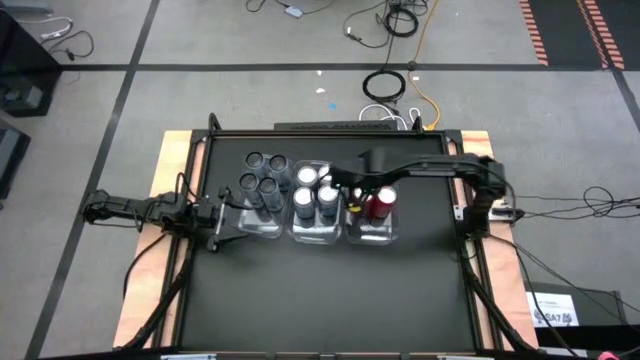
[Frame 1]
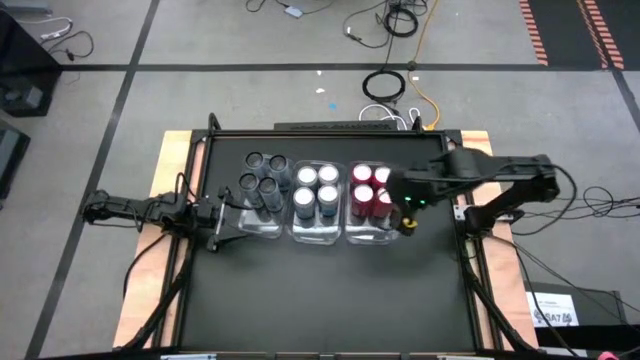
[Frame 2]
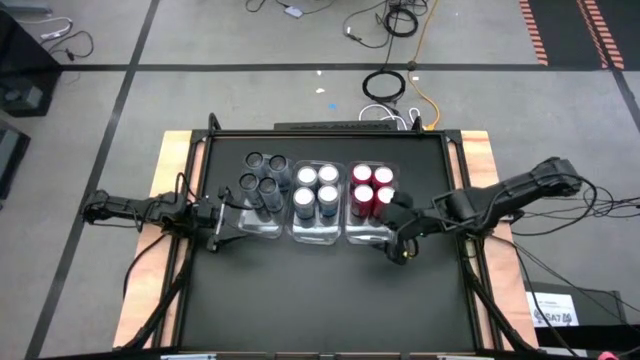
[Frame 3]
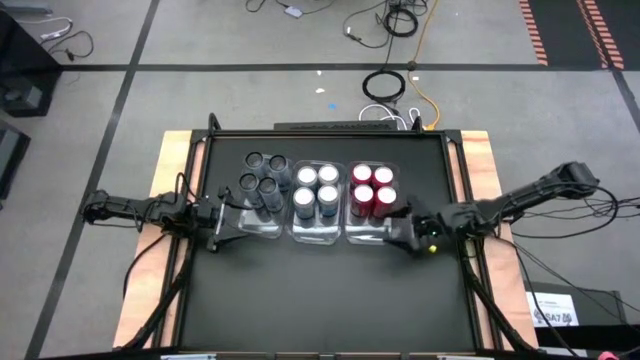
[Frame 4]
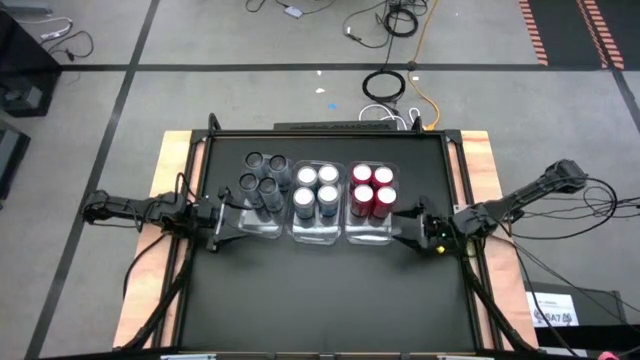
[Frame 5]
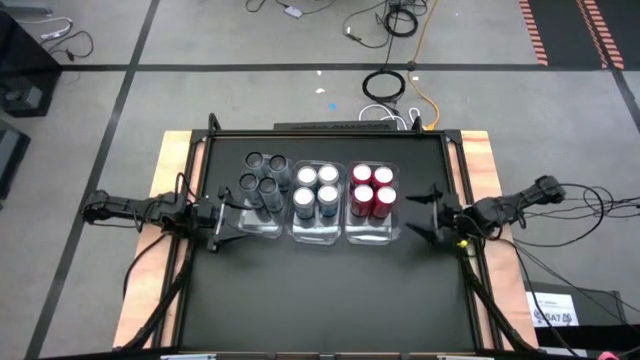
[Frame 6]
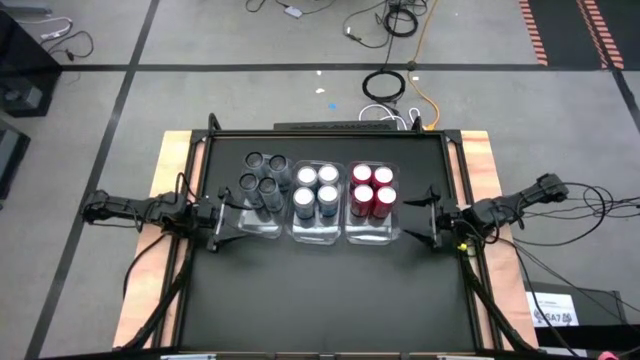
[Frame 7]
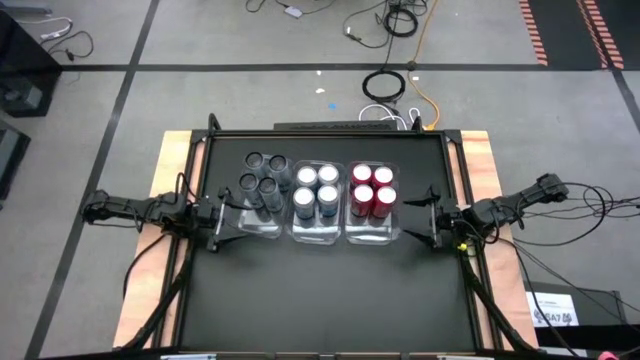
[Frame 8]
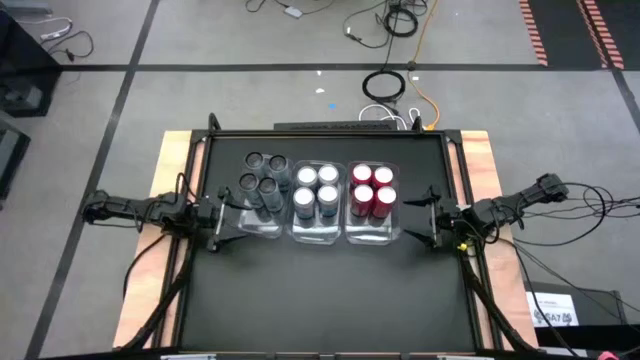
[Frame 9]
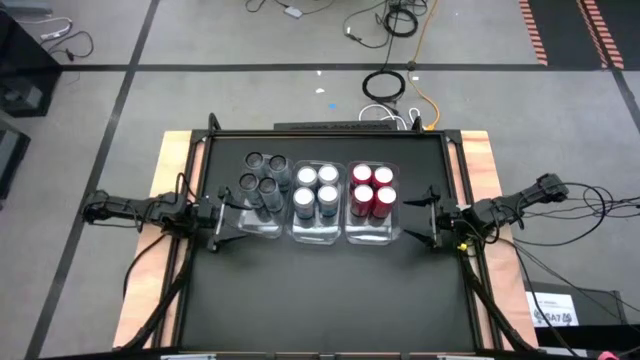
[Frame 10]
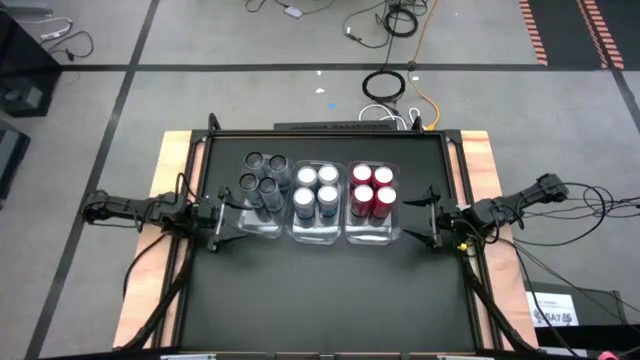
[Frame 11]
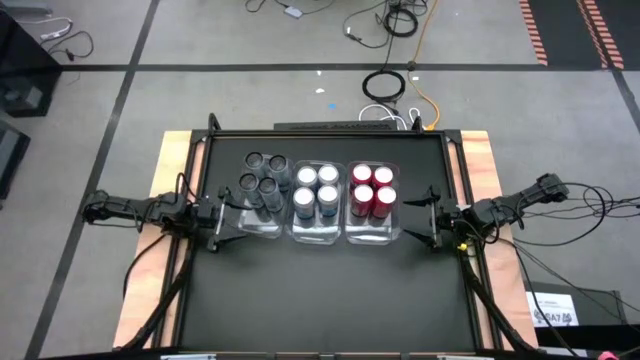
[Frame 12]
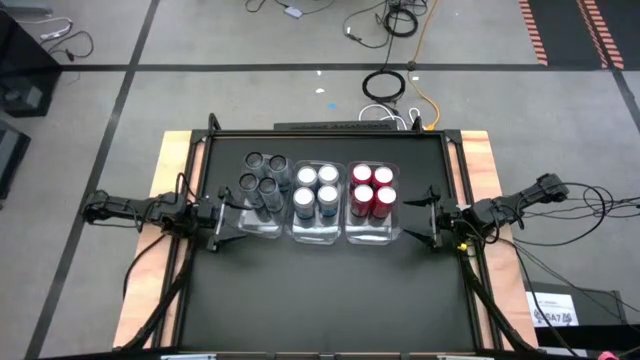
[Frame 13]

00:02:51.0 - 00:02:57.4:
Task: Sort soda cans
Return to Home Position

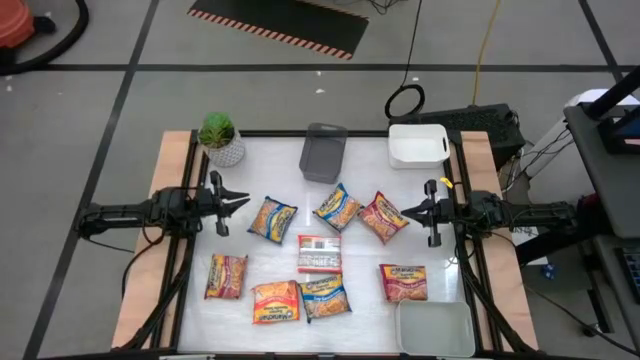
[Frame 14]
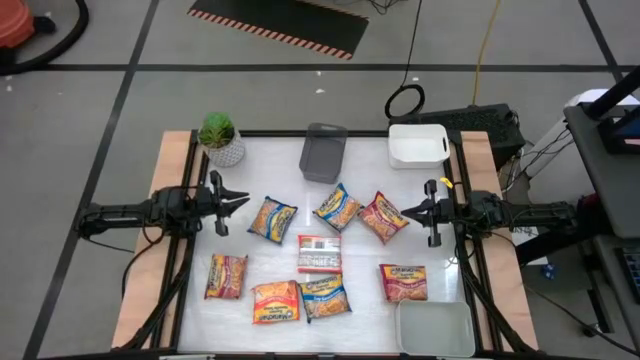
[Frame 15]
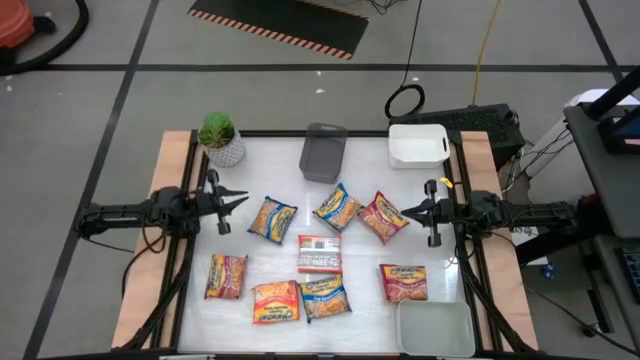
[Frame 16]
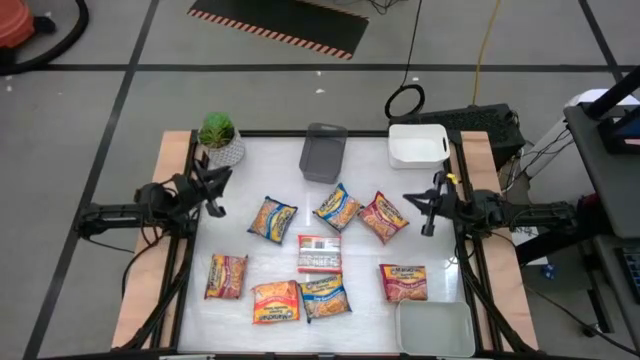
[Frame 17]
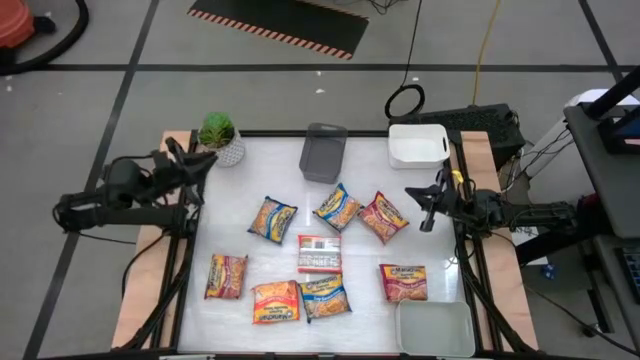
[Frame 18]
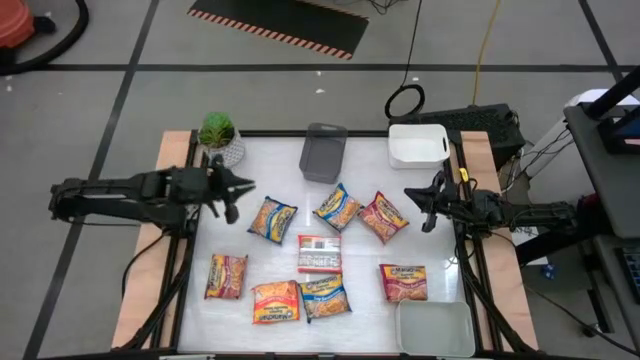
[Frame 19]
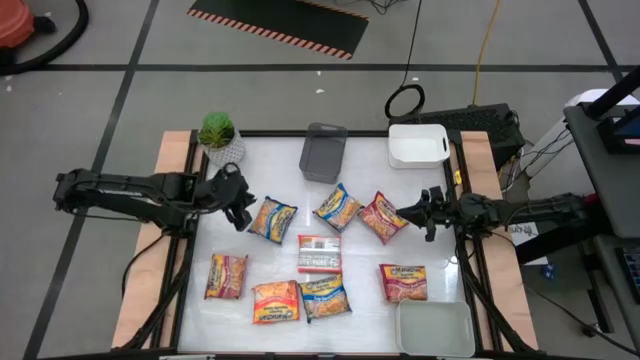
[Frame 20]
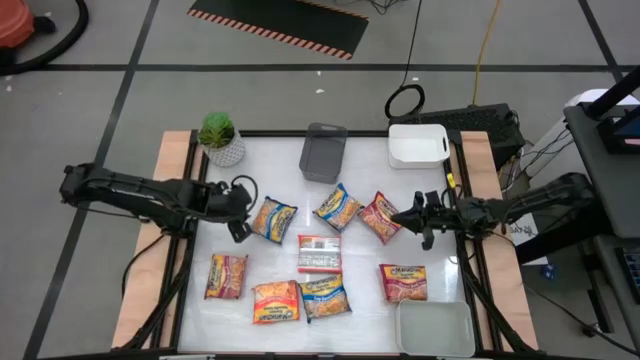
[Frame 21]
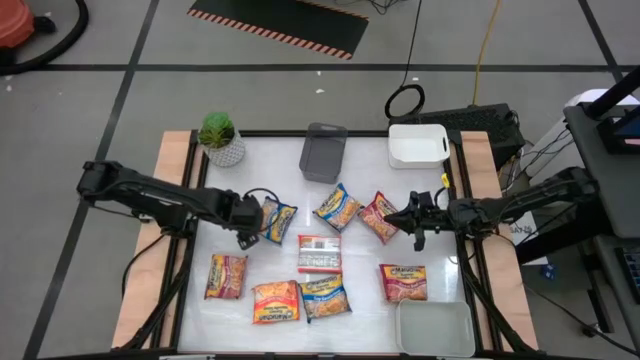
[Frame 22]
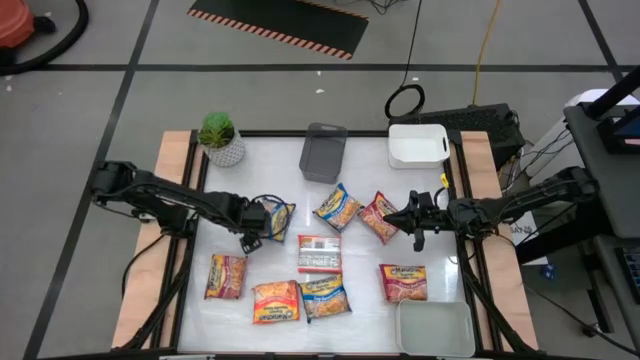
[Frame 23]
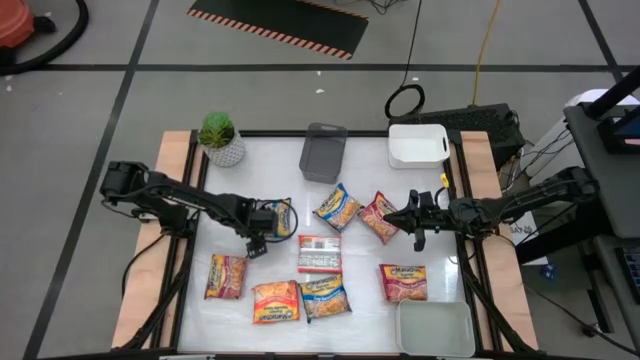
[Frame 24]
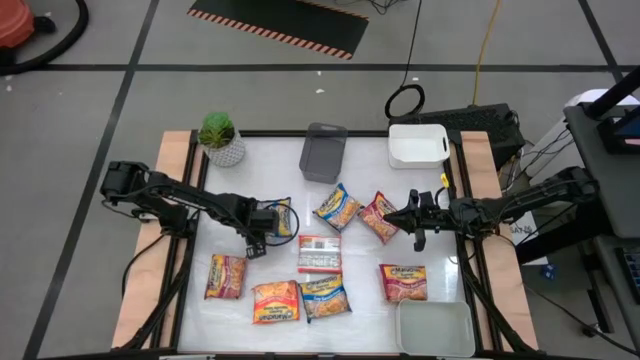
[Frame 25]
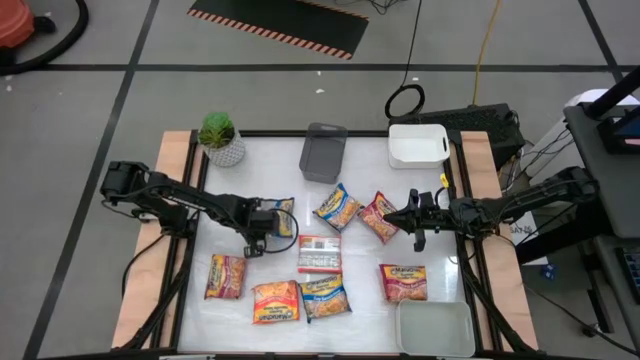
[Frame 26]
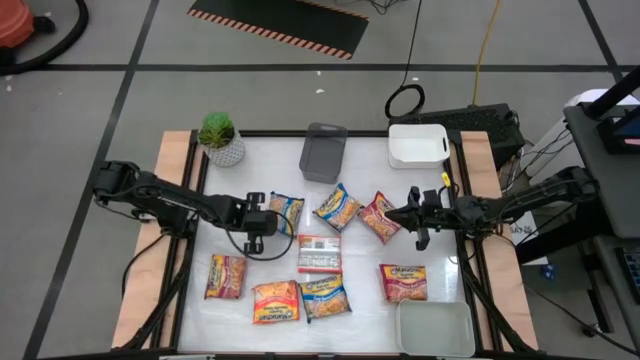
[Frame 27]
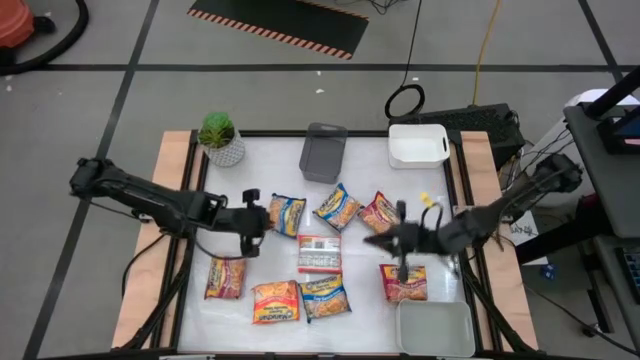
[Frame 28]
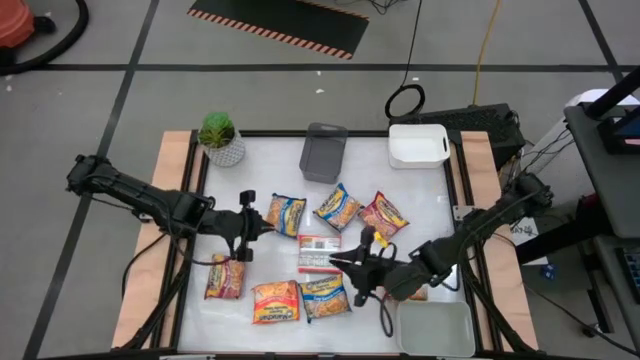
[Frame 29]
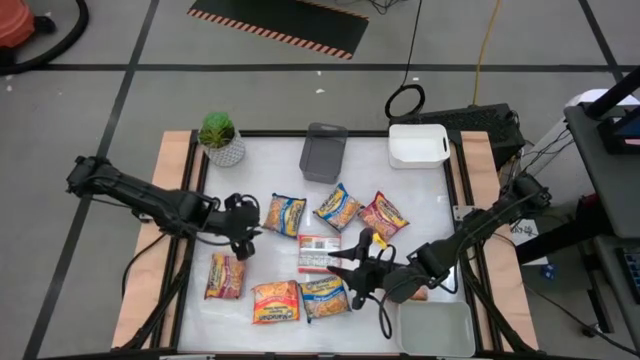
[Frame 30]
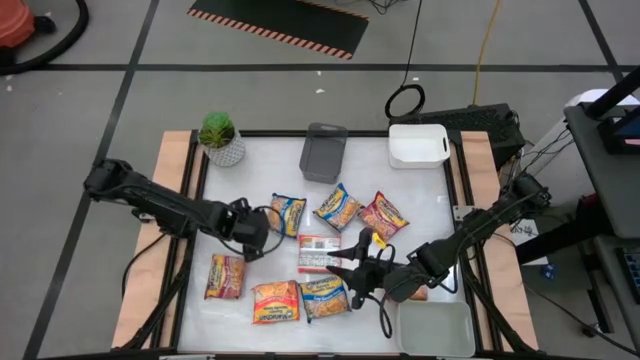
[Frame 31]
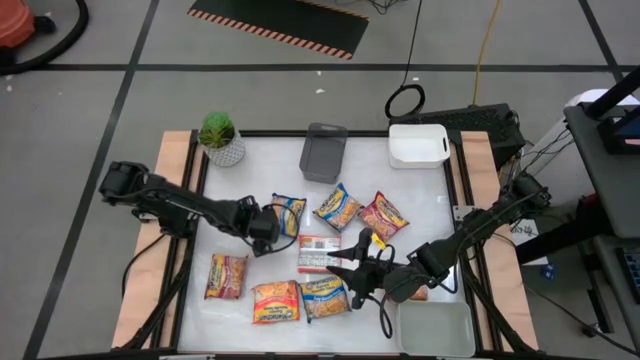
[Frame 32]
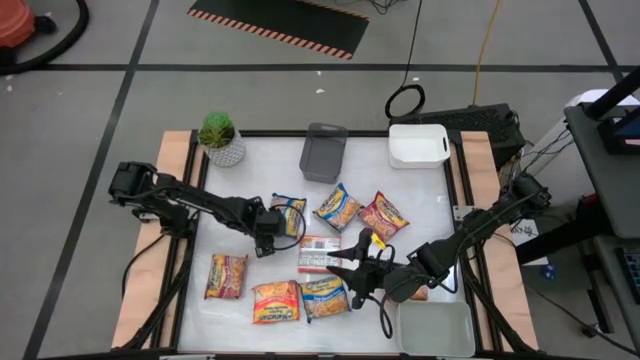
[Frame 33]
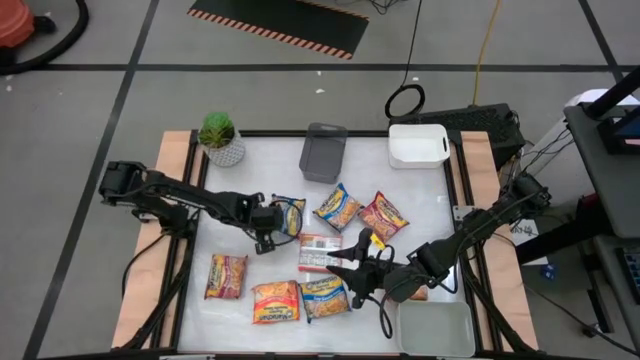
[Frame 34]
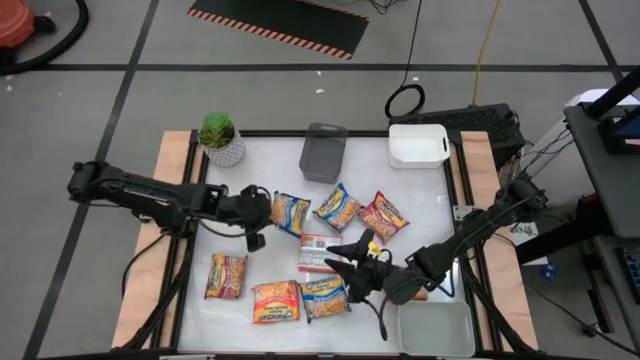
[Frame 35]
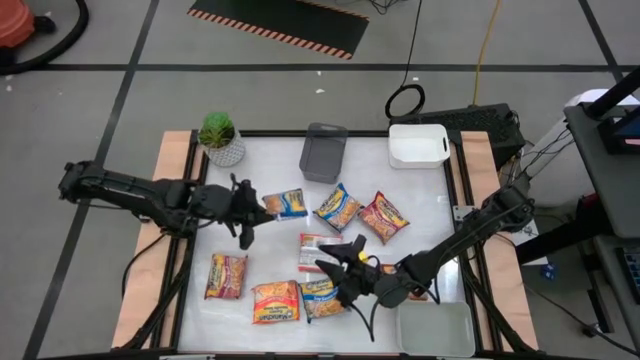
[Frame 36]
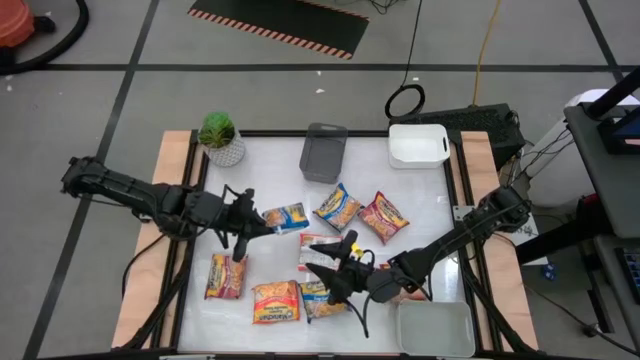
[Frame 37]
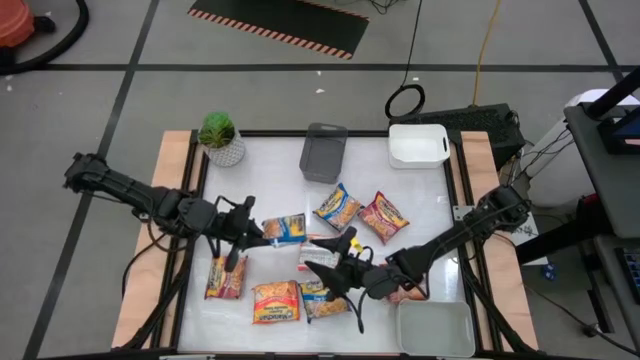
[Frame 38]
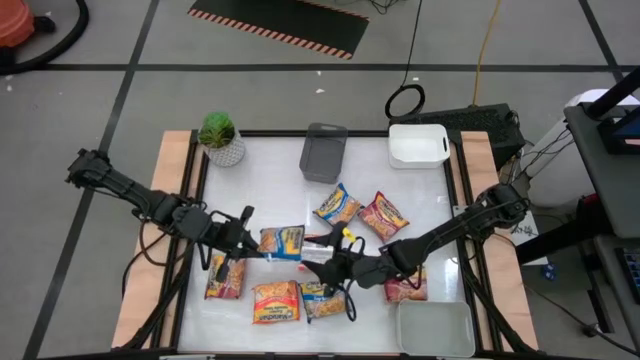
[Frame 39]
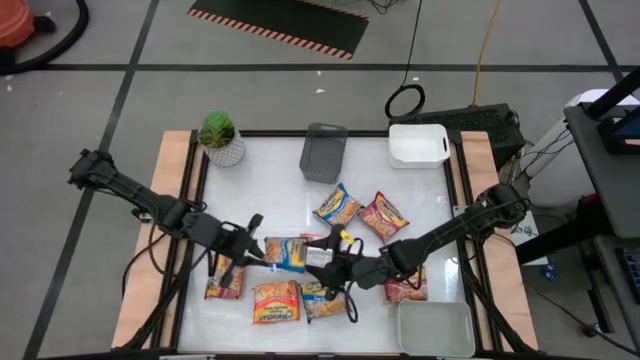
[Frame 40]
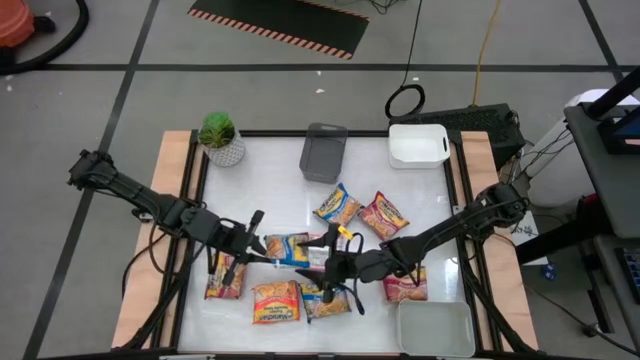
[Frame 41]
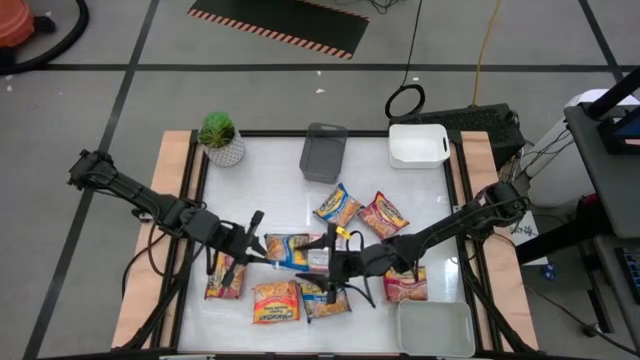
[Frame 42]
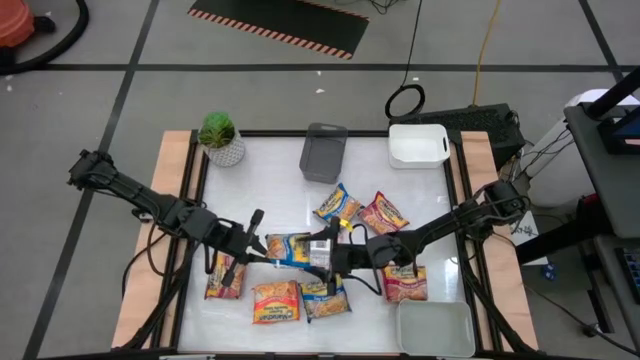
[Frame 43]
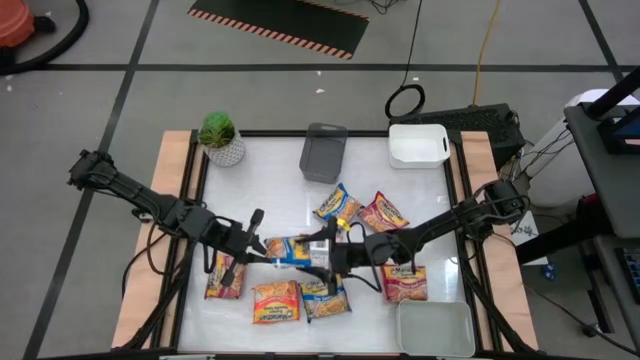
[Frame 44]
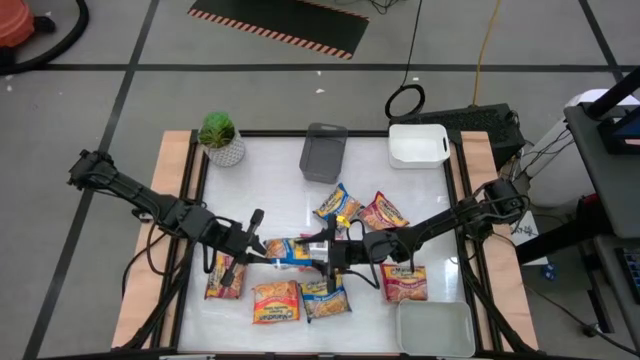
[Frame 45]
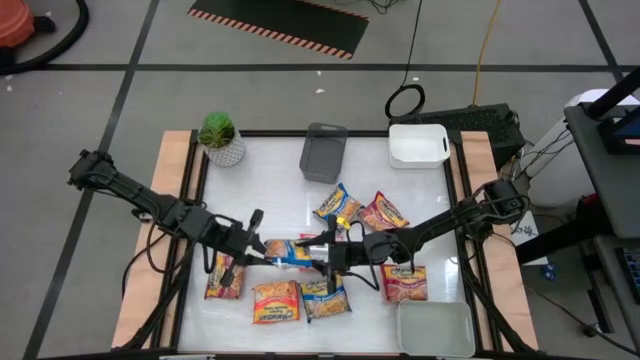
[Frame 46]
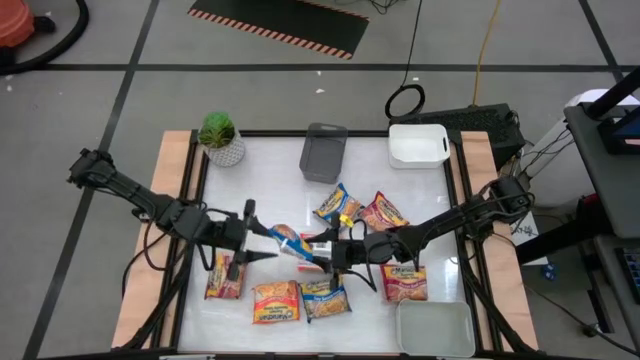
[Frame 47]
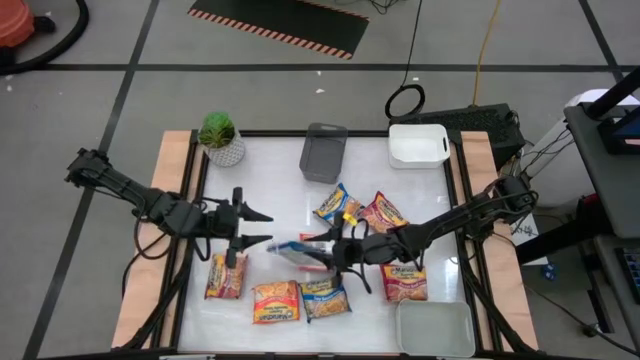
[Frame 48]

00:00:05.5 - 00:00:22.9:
Task: Sort Maruchan noodles
Put the top left blue noodle pack into the white bin
